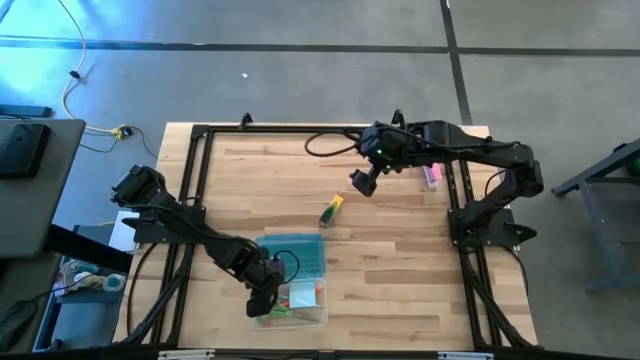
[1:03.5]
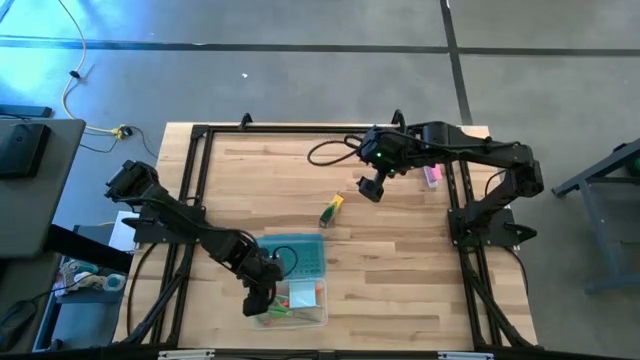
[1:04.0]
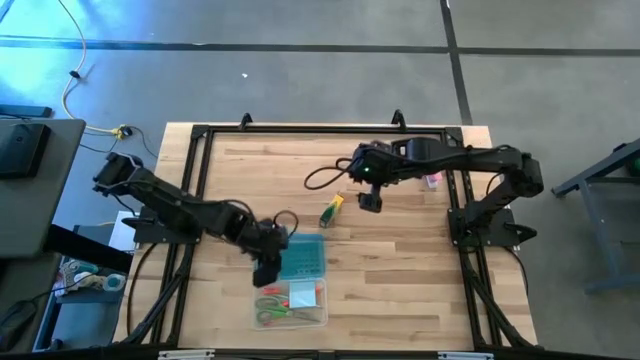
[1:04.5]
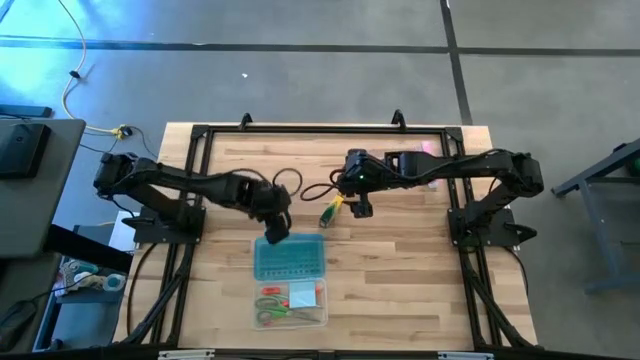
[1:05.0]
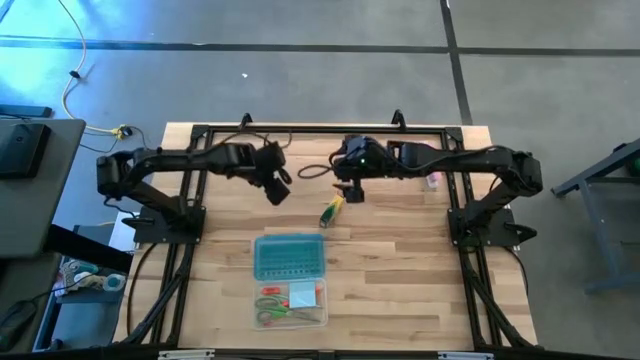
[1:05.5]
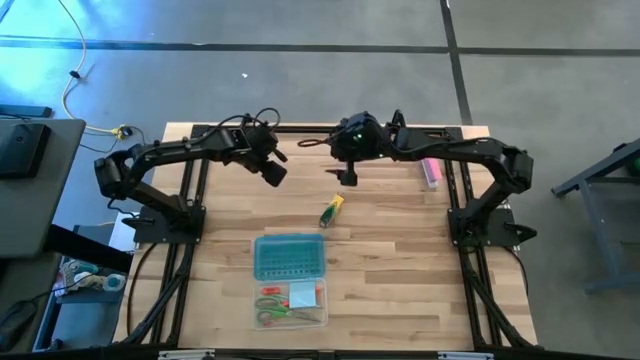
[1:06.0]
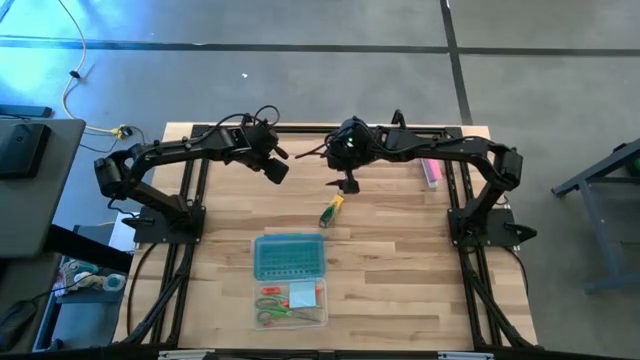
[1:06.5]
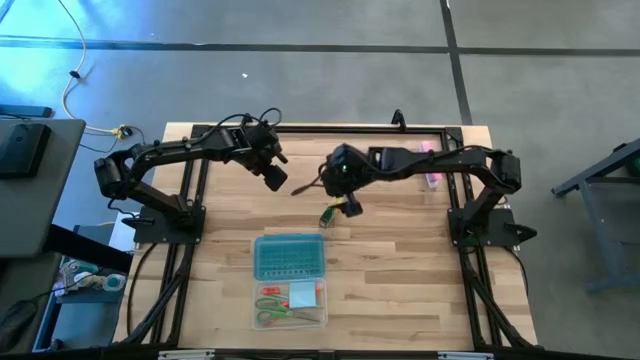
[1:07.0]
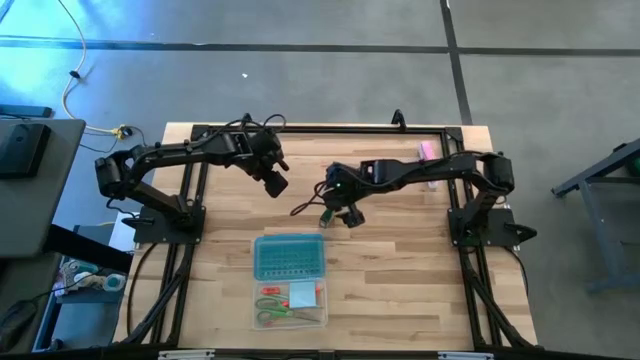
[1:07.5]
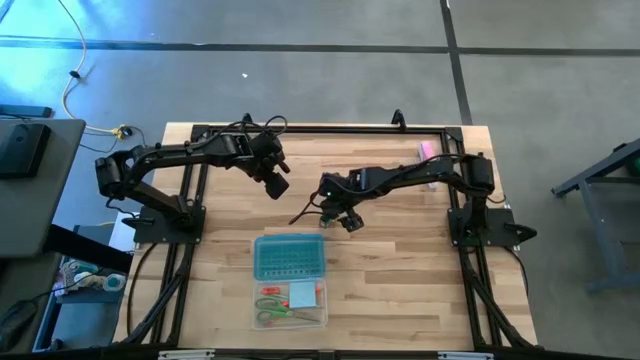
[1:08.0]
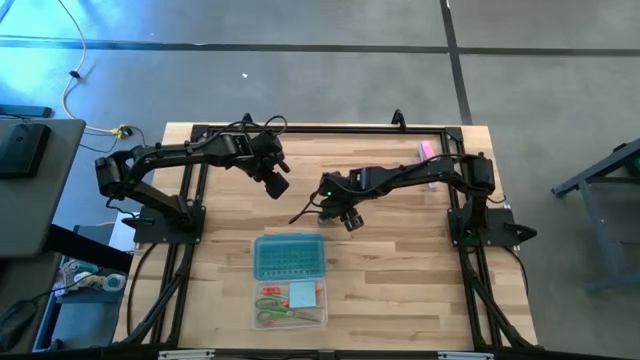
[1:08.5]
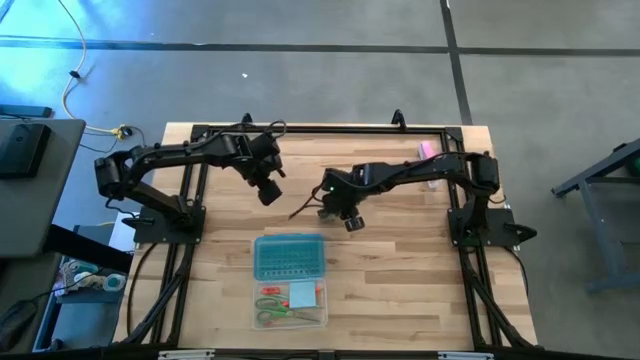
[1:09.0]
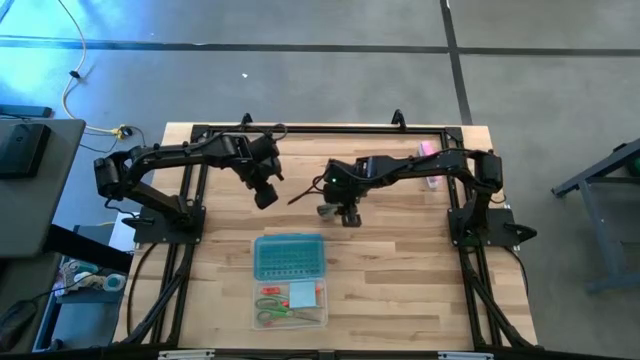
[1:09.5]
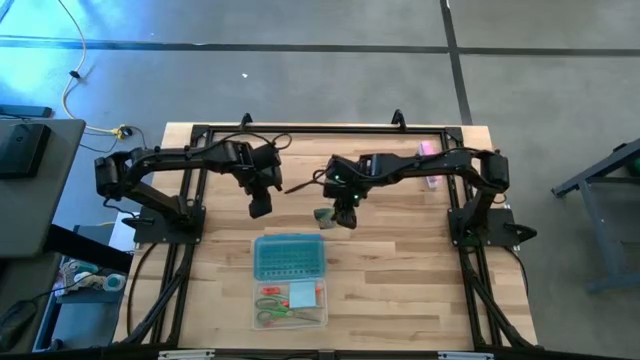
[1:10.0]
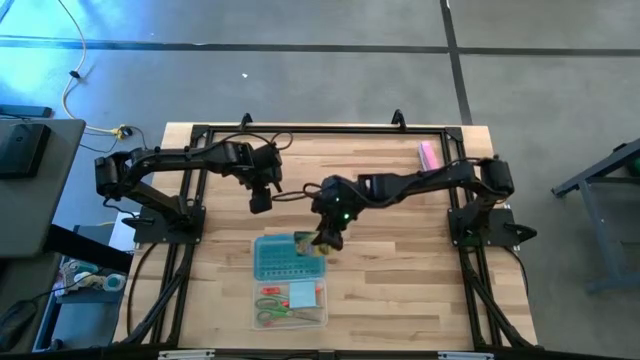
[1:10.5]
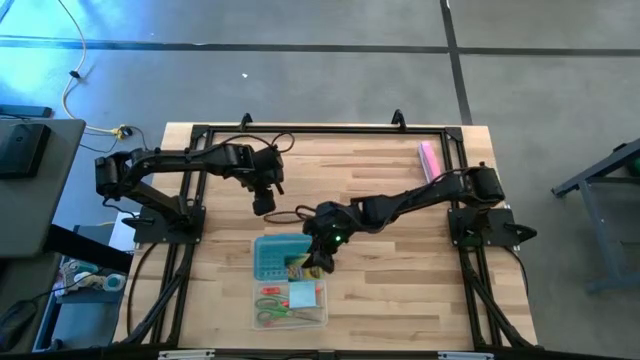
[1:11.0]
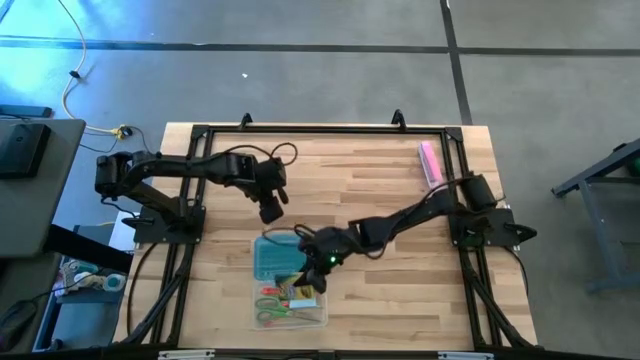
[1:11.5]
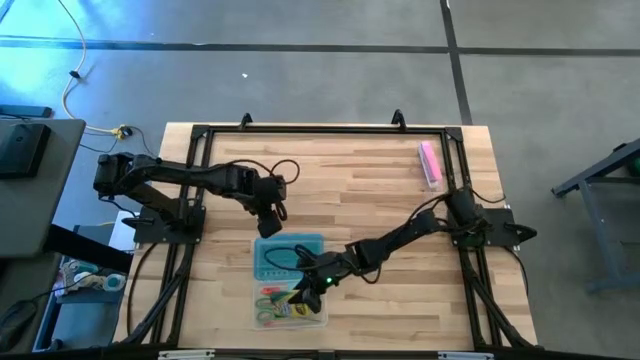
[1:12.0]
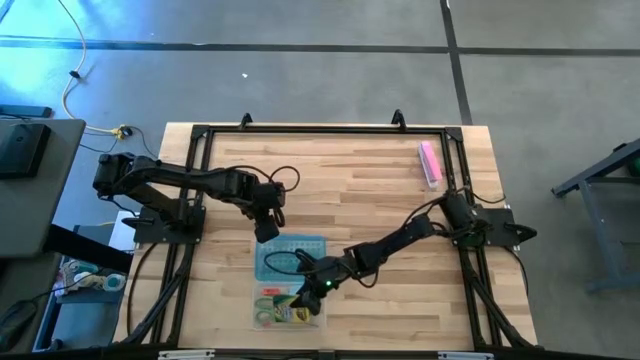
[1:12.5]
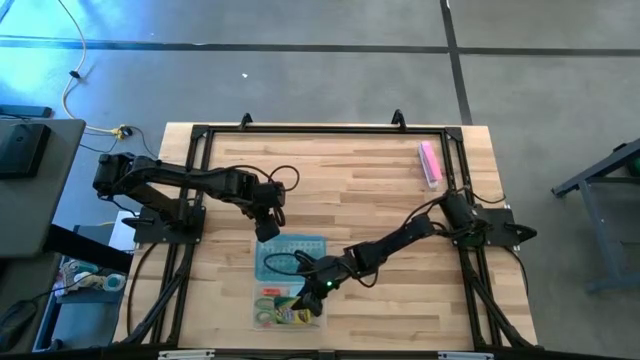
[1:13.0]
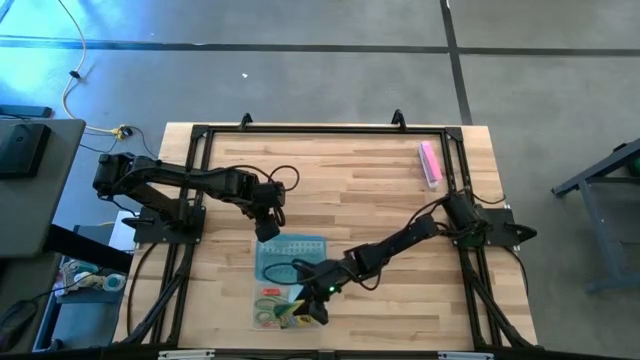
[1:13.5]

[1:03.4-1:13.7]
Task: Pack school essentials
Put the yellow crayon box into the supply box

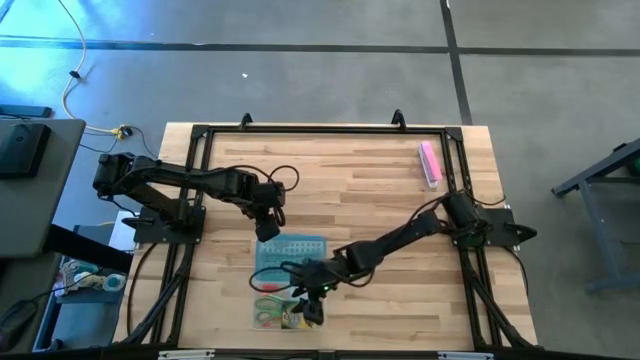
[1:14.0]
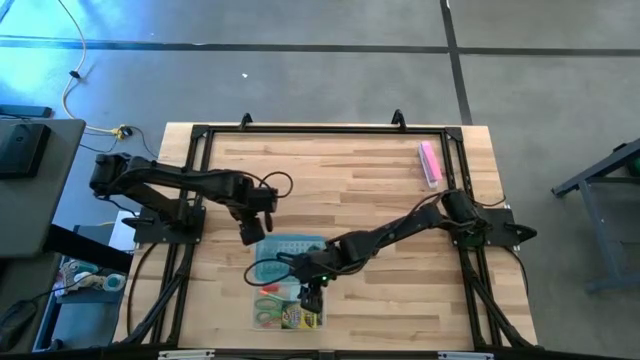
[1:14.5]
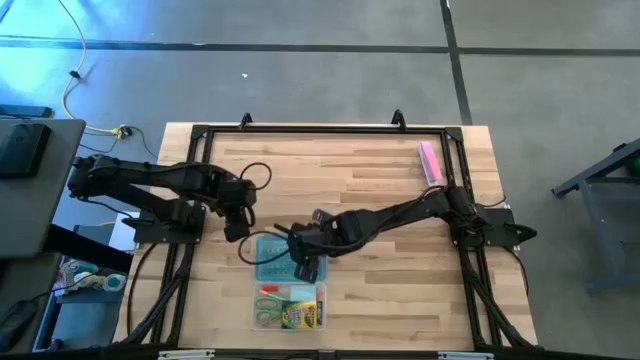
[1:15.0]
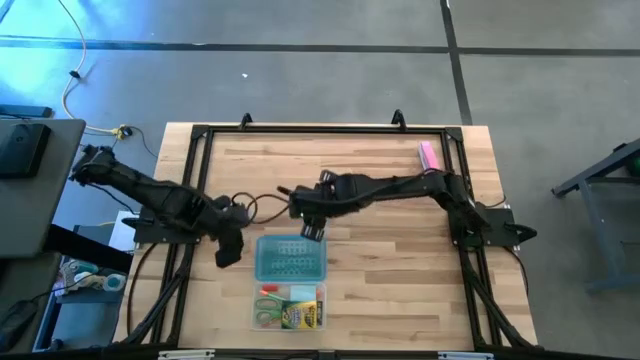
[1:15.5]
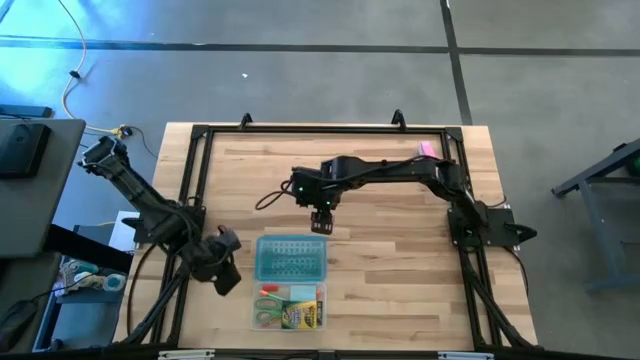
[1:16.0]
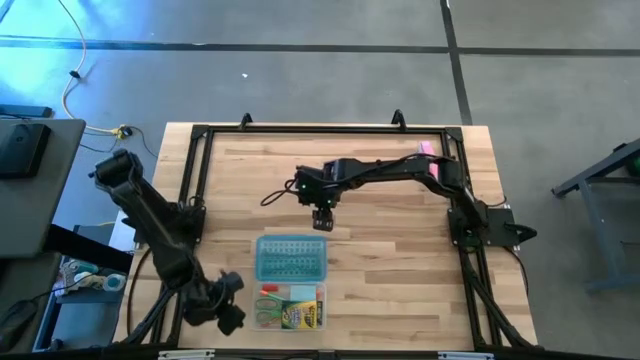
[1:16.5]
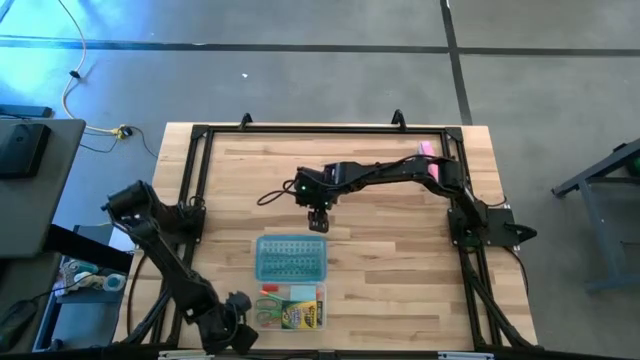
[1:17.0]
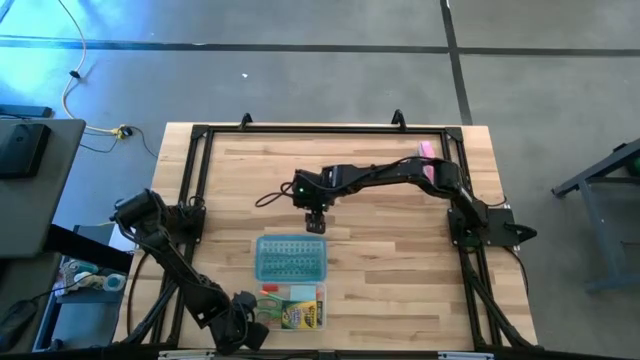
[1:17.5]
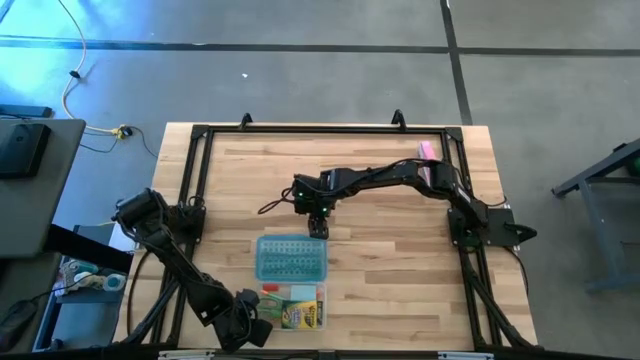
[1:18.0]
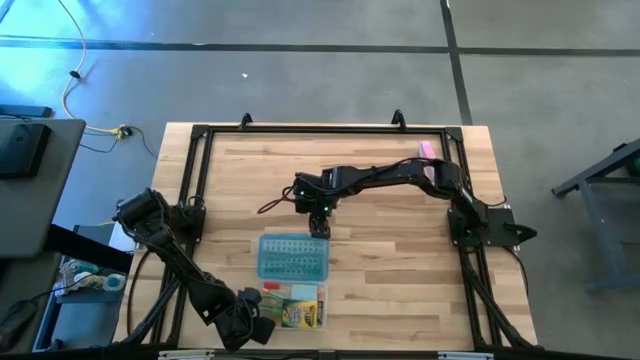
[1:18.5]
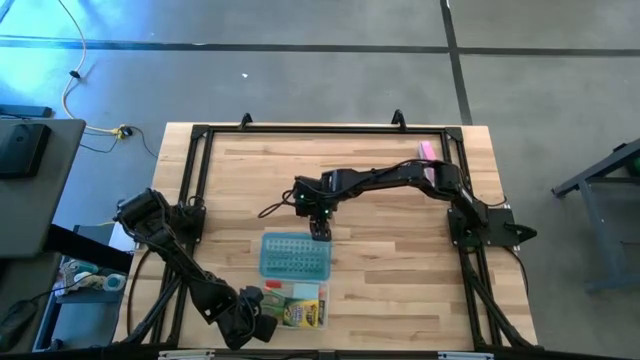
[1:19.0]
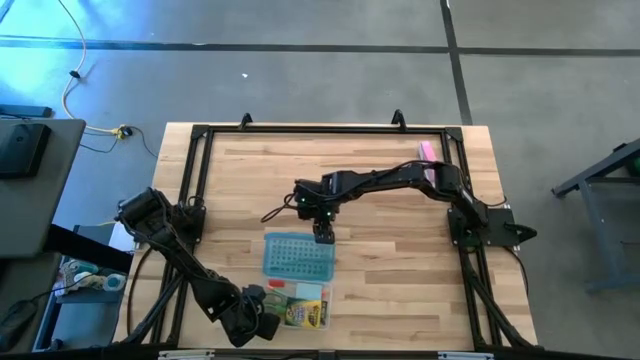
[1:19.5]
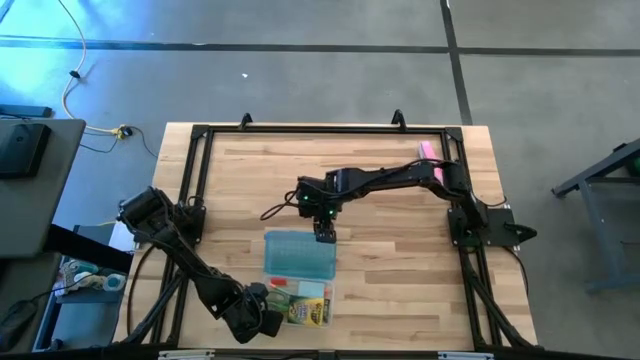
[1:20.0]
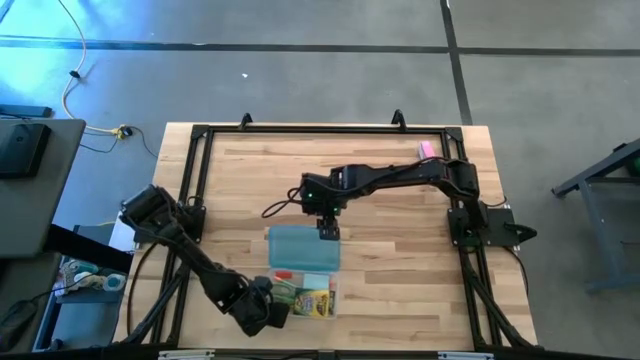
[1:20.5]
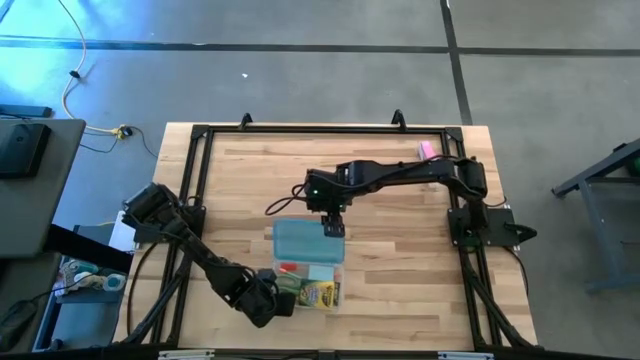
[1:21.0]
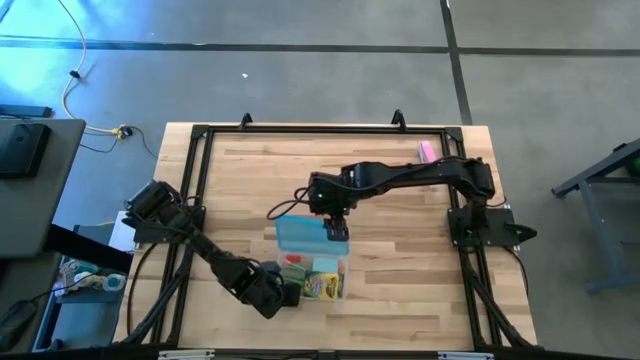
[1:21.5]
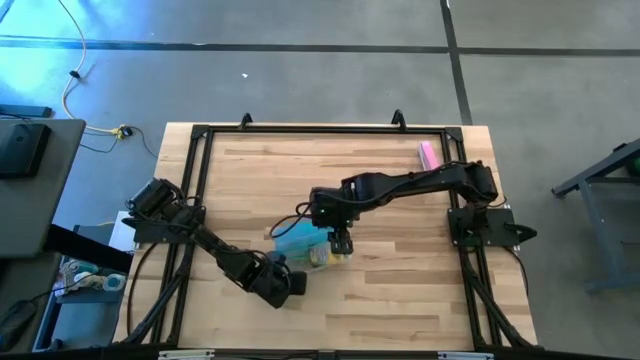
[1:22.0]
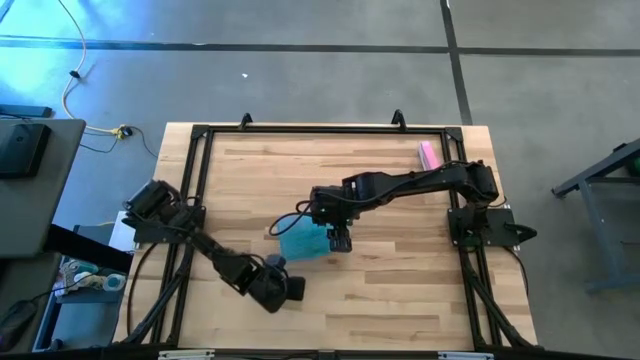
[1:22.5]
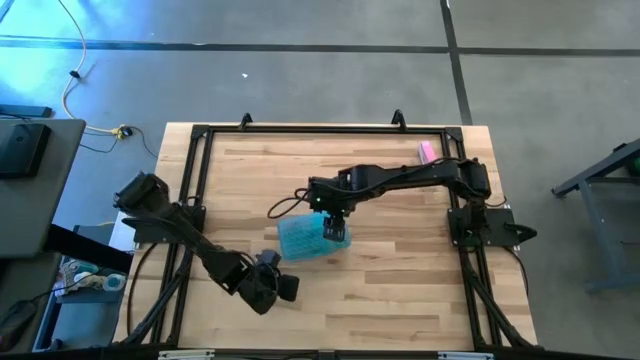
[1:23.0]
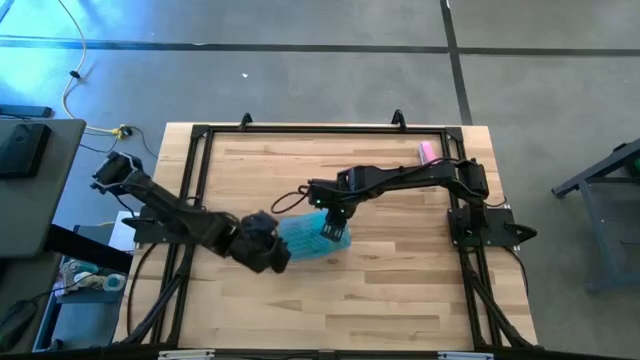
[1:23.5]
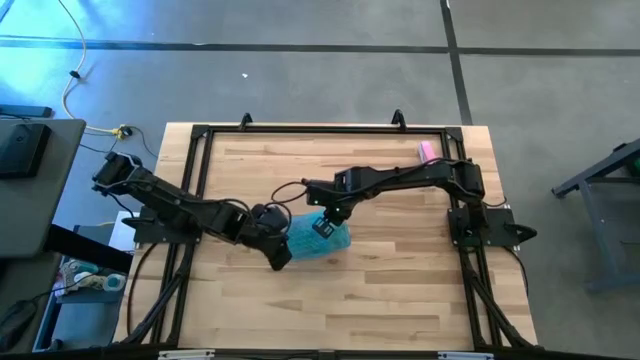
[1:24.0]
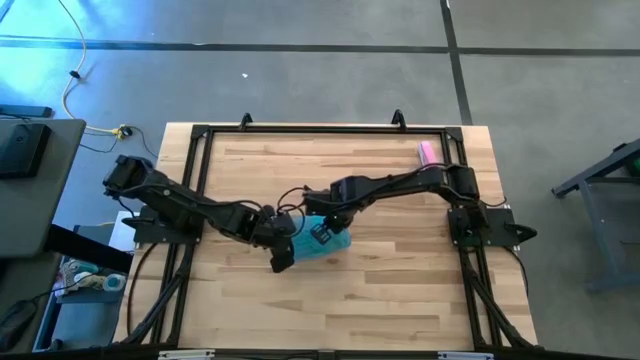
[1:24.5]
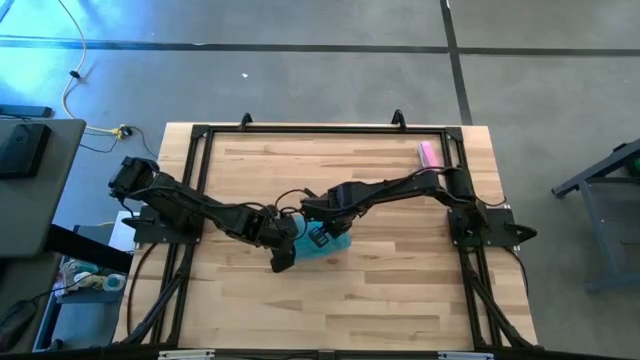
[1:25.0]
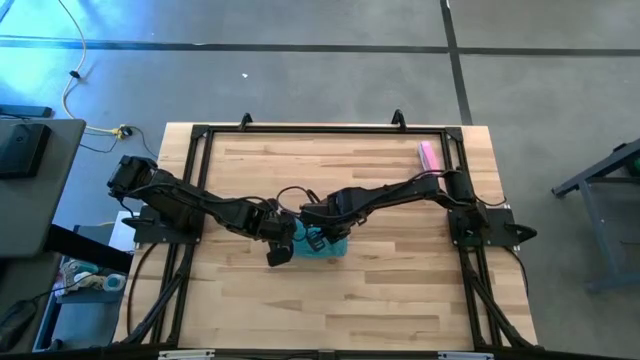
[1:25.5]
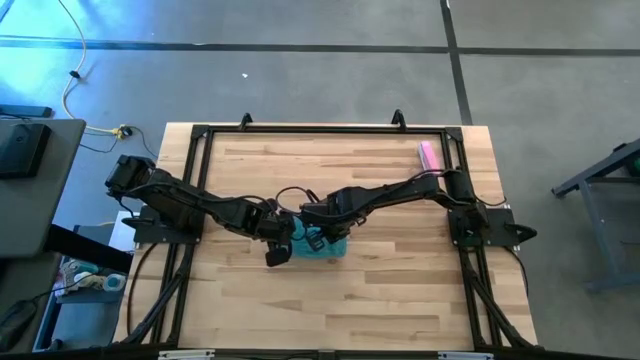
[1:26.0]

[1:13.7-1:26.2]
Close the supply box
